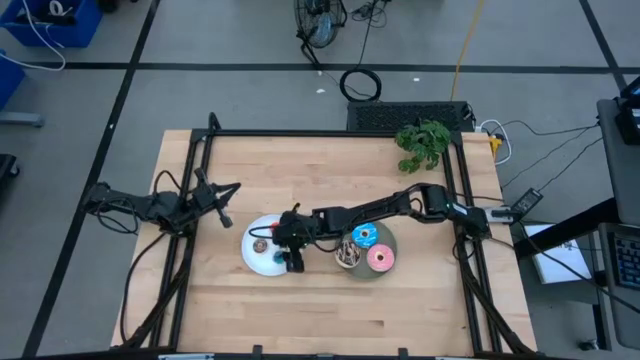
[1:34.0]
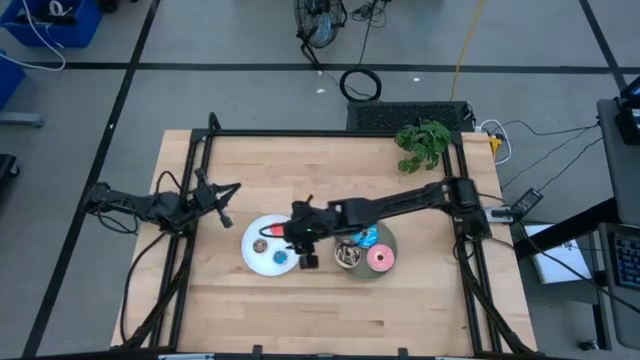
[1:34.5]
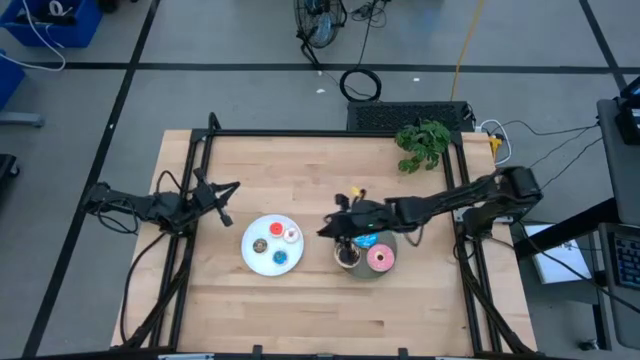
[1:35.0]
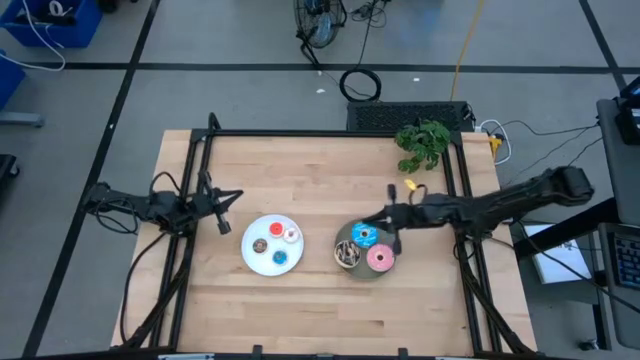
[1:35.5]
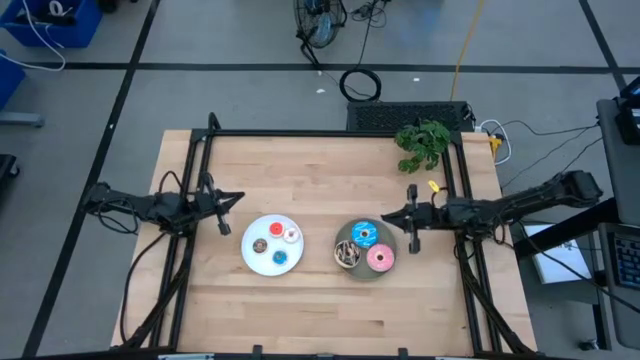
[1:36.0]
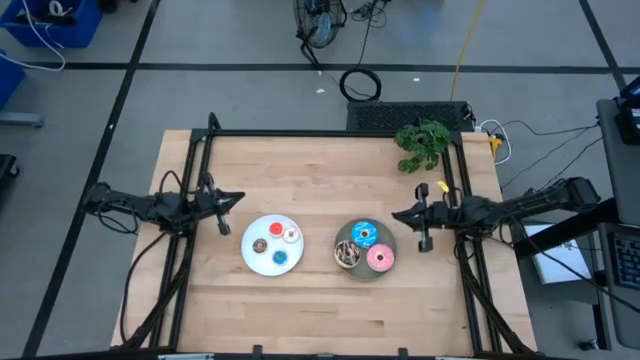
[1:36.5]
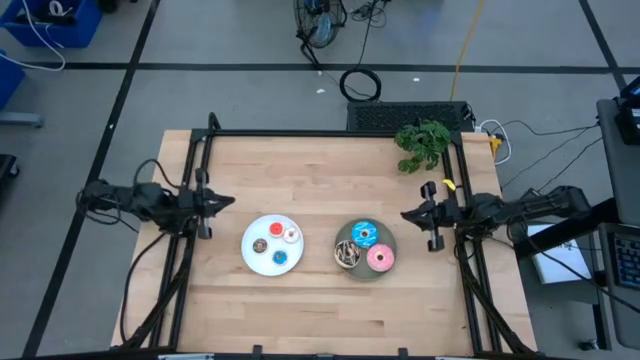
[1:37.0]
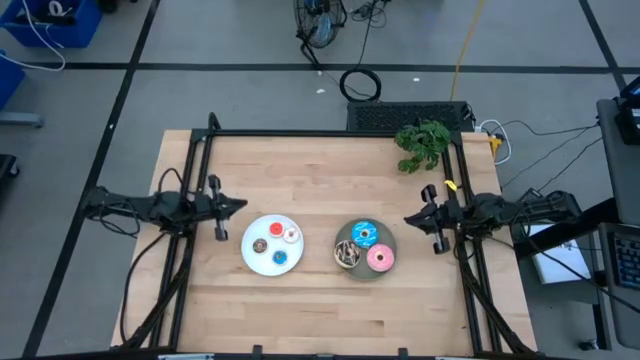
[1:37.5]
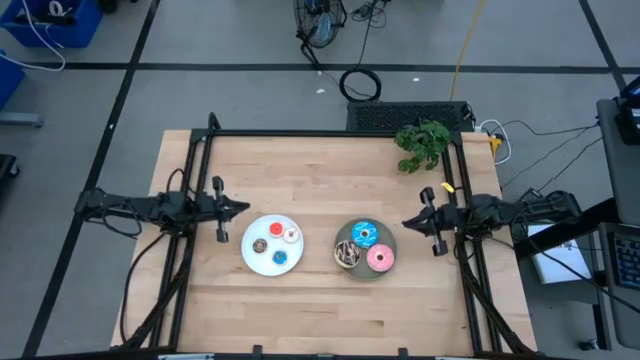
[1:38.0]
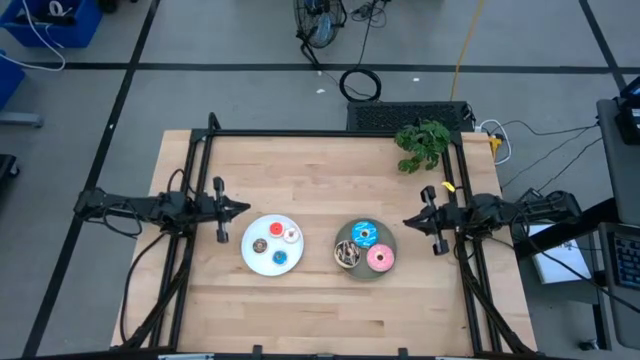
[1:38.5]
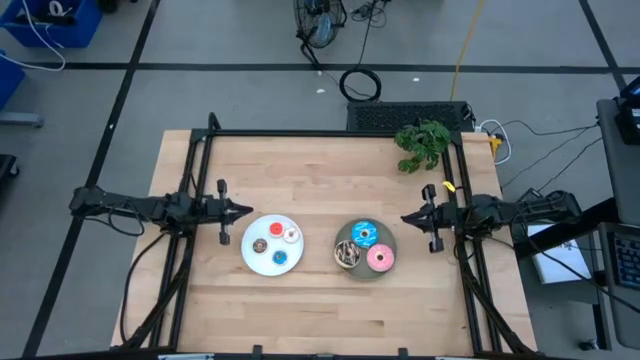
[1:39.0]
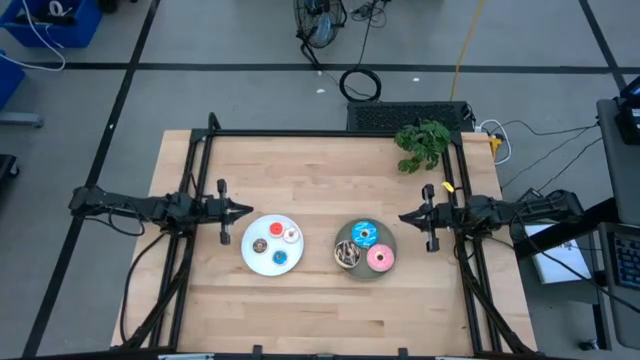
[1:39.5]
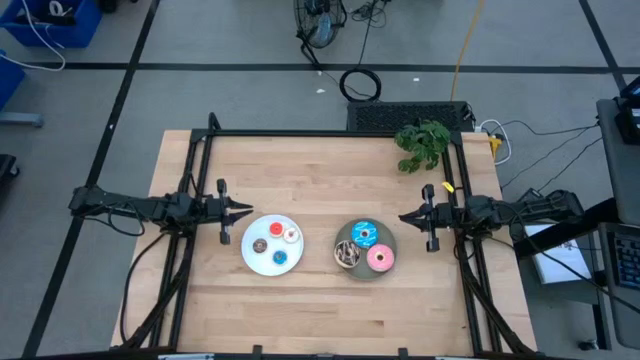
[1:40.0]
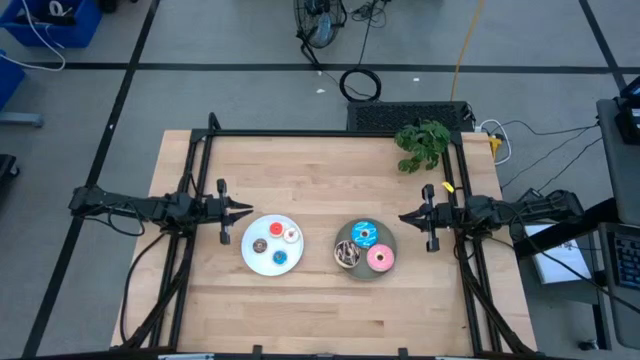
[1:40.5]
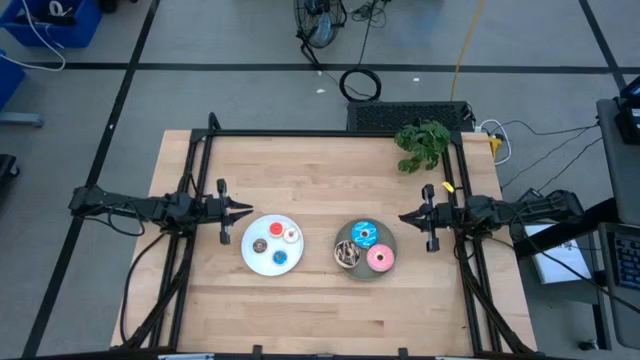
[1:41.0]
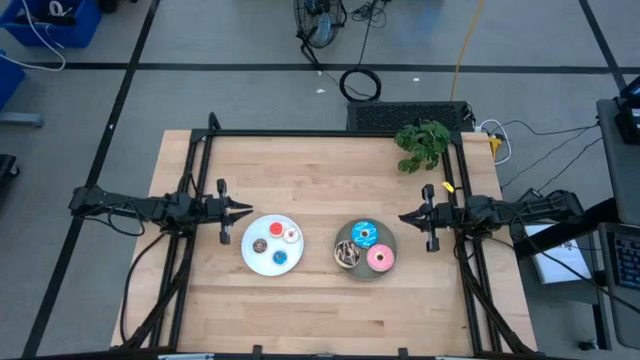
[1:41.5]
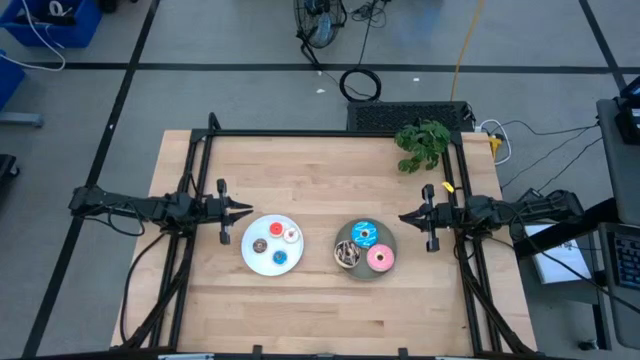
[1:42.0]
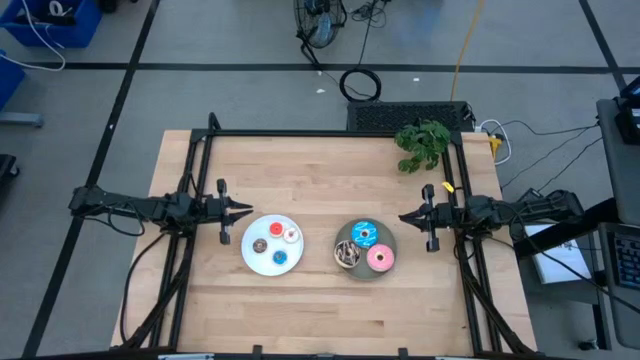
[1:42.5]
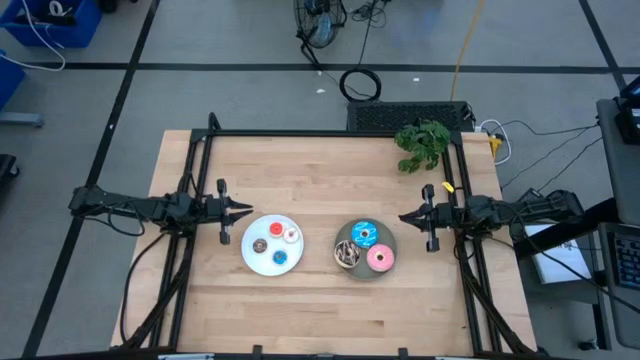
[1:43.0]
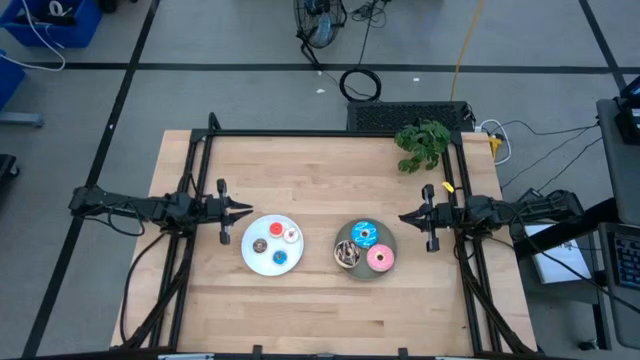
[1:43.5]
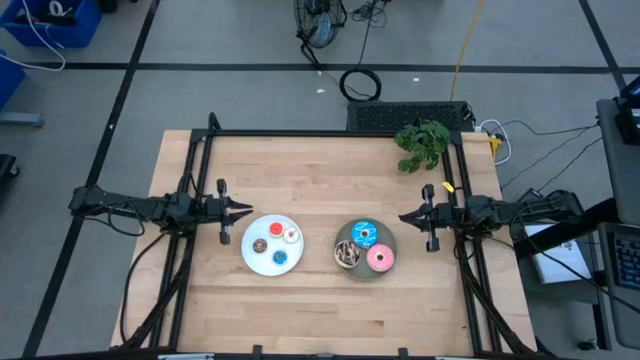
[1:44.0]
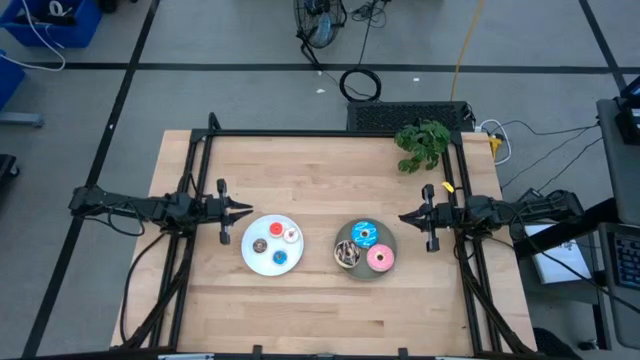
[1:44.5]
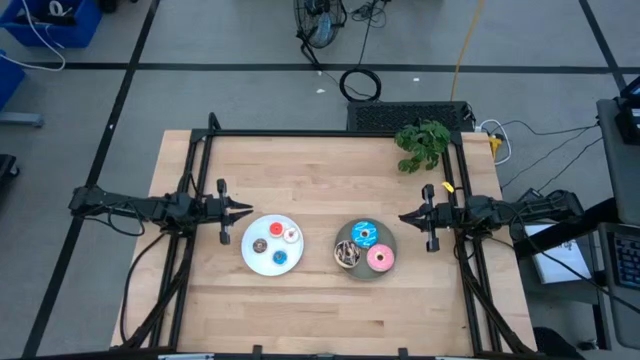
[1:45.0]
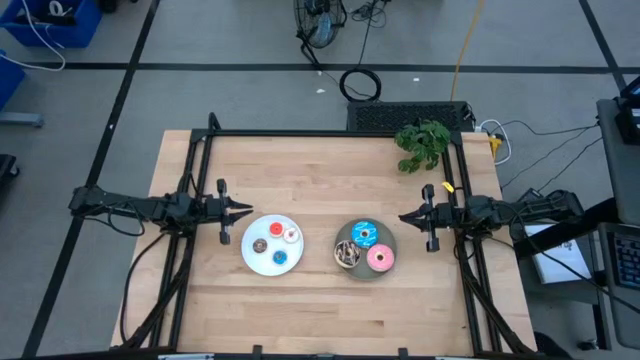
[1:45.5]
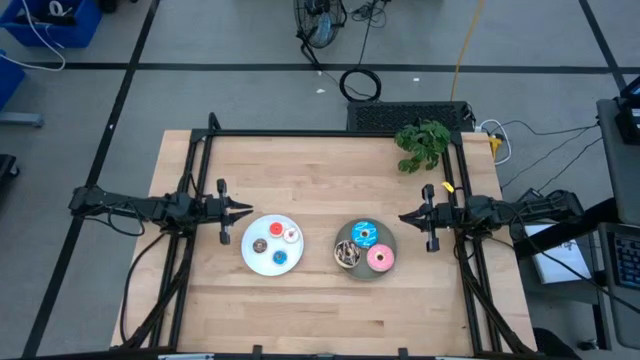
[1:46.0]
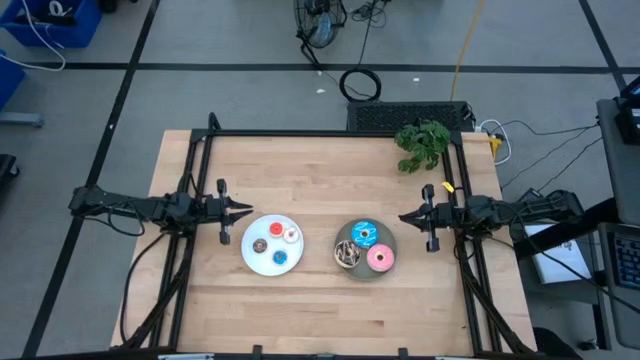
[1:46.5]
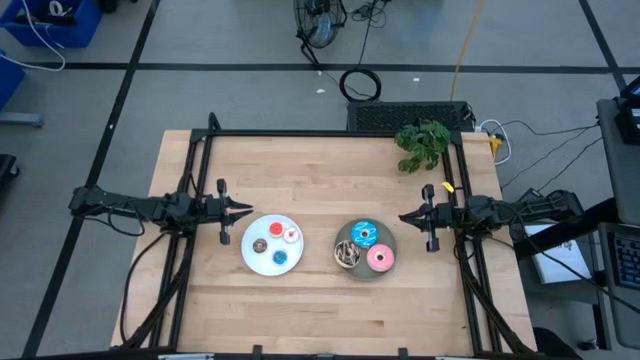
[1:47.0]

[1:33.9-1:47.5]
Task: Pick & Place donuts
Return to Home Position

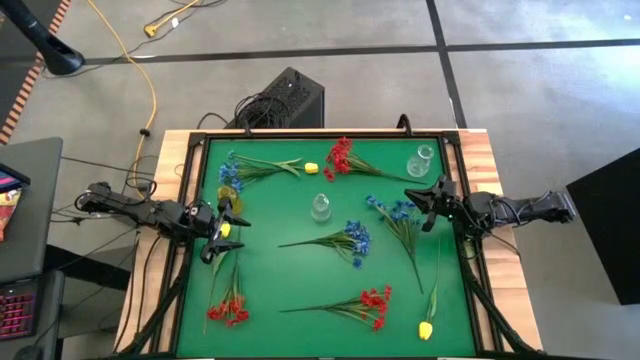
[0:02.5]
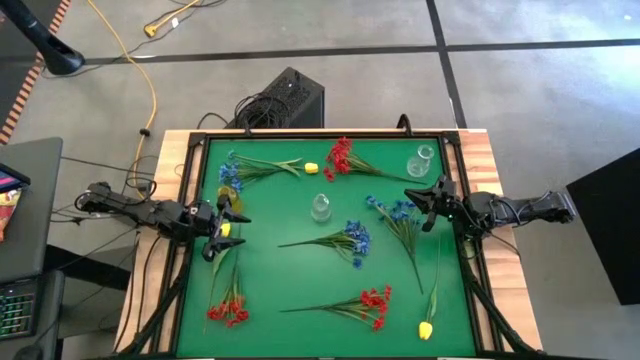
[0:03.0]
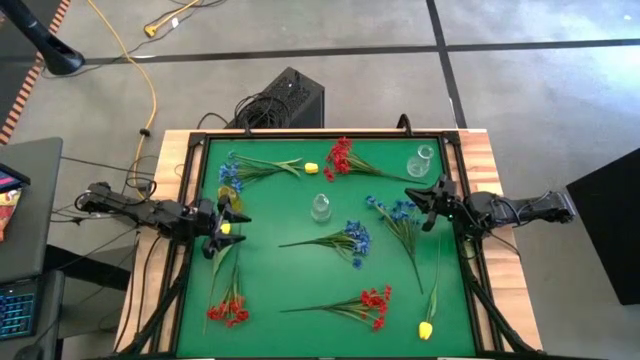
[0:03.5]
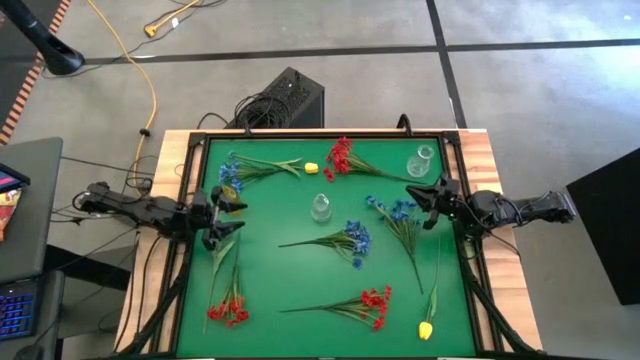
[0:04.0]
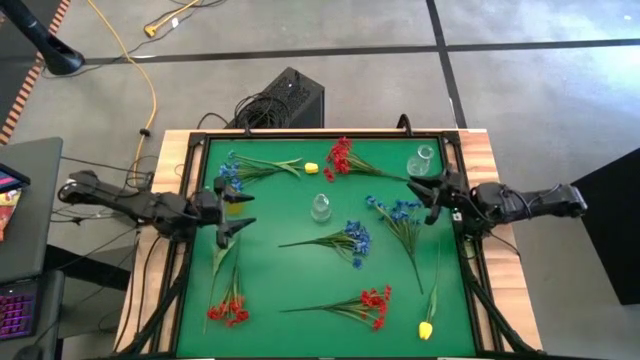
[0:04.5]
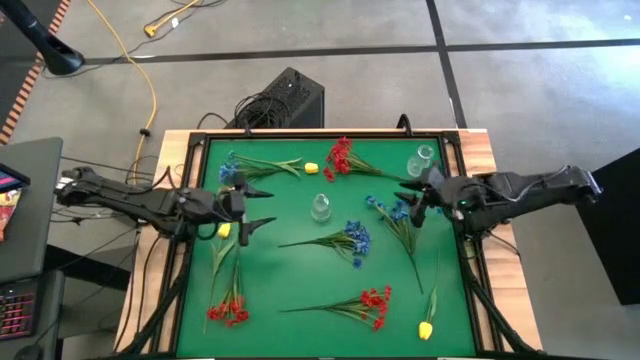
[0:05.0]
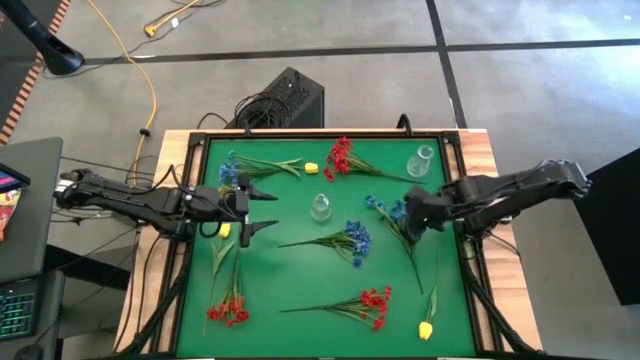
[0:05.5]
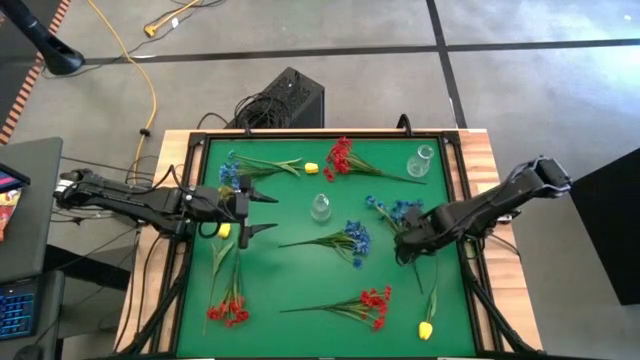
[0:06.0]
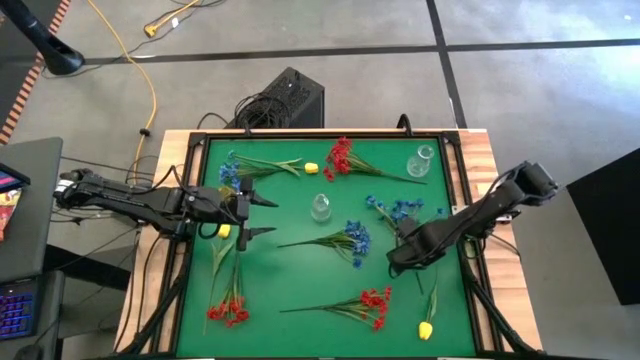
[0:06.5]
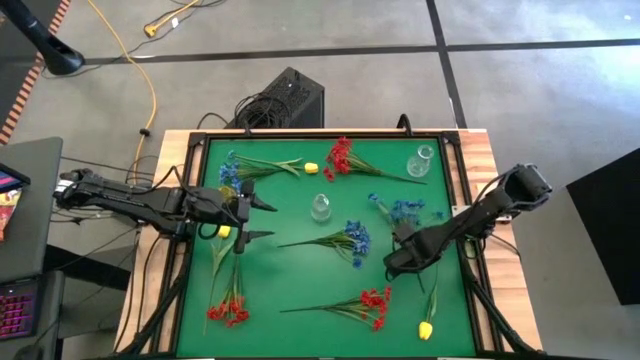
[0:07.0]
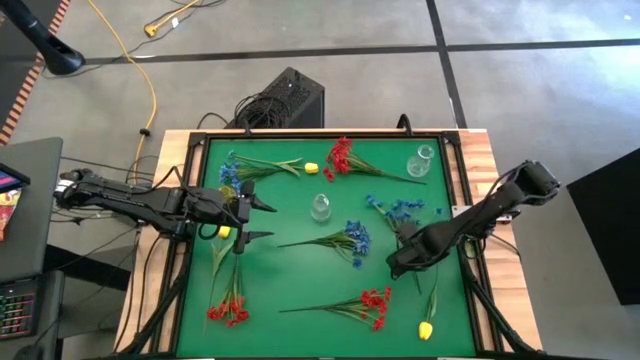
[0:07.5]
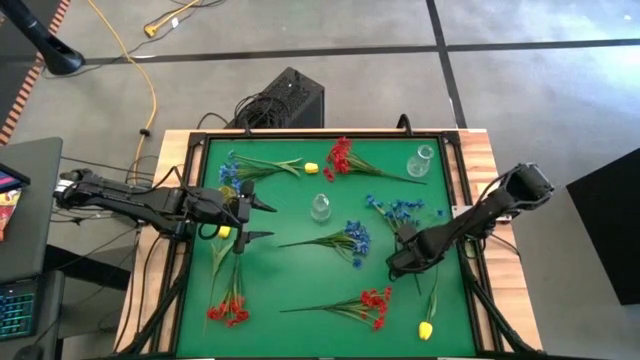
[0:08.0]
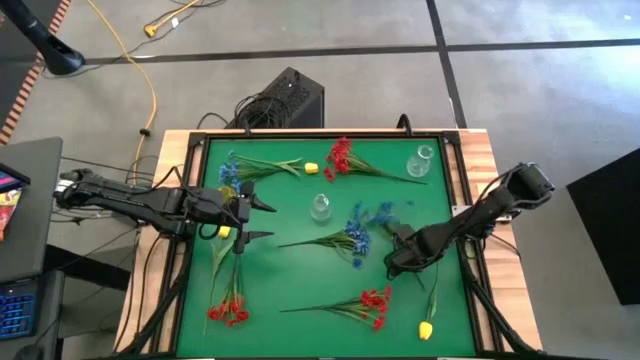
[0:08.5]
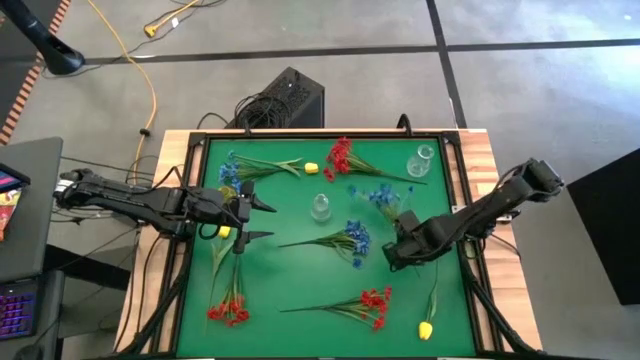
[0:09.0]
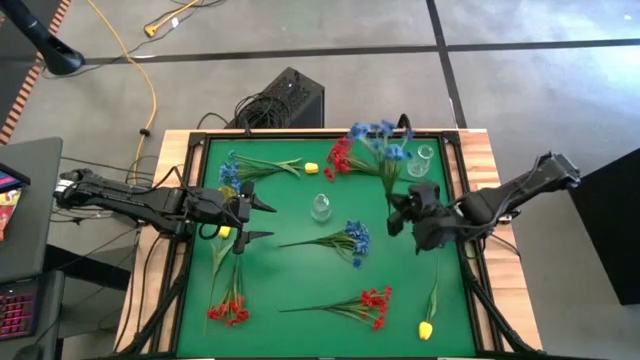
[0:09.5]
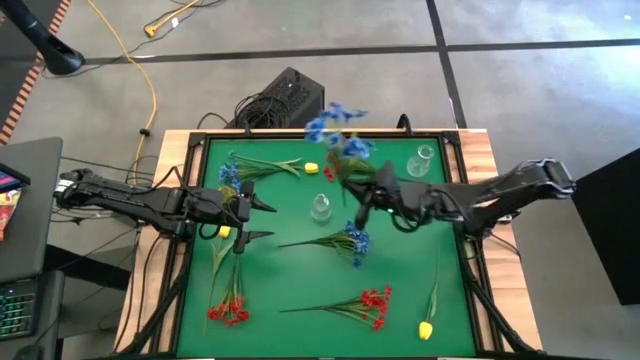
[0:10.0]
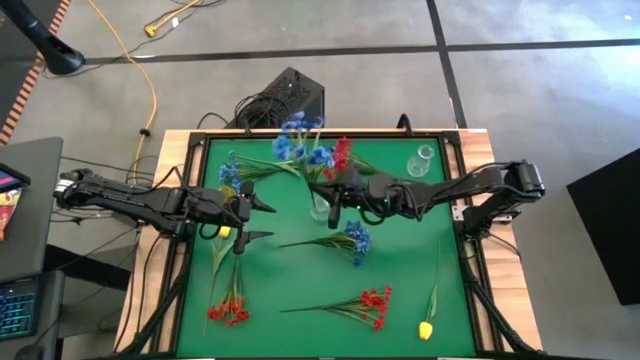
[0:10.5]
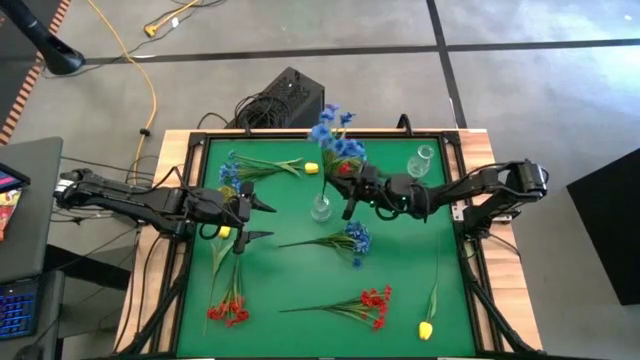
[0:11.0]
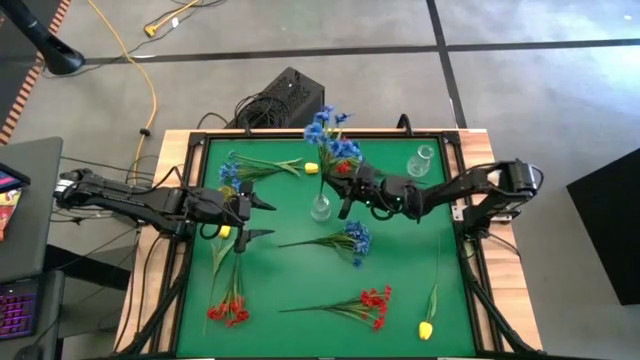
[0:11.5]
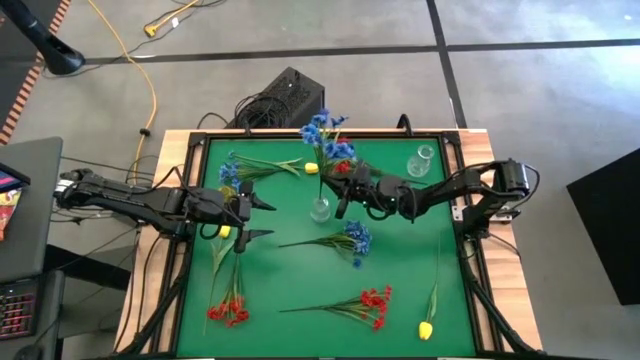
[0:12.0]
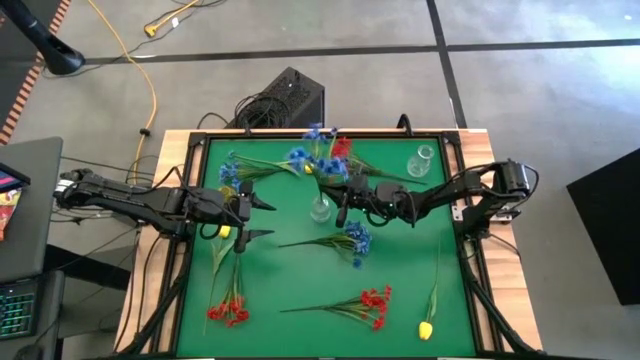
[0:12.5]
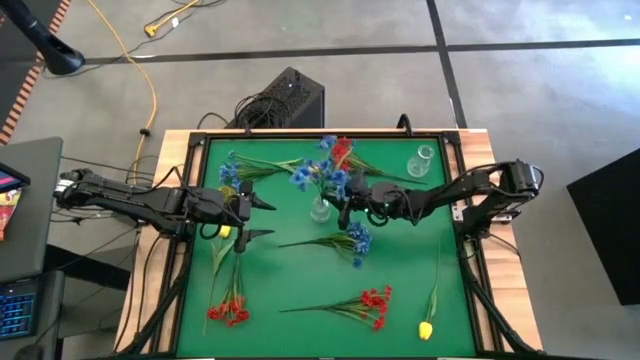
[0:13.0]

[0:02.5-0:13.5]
Task: Sort flowers into vase by color
Put the bottom right blue flowers into the bottom transparent vase
